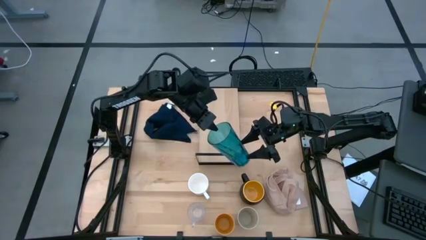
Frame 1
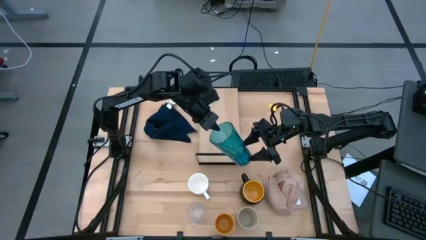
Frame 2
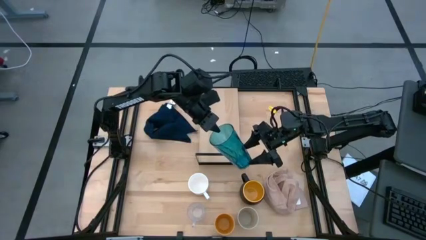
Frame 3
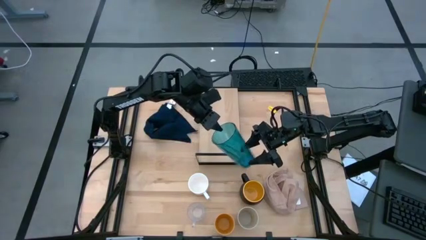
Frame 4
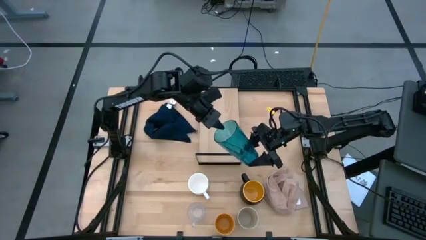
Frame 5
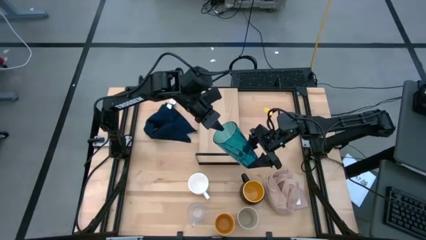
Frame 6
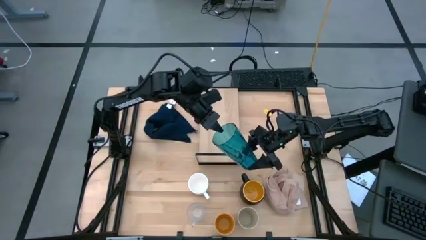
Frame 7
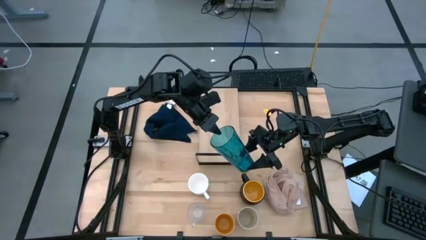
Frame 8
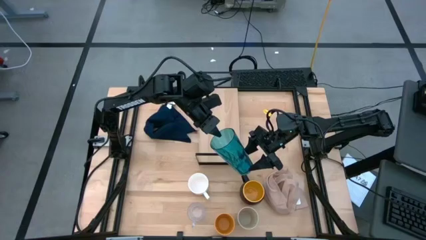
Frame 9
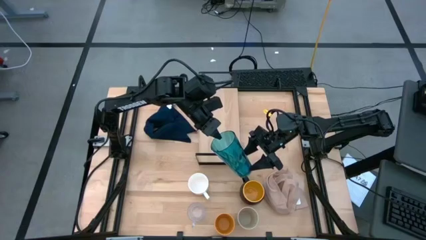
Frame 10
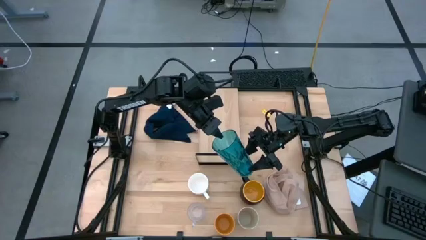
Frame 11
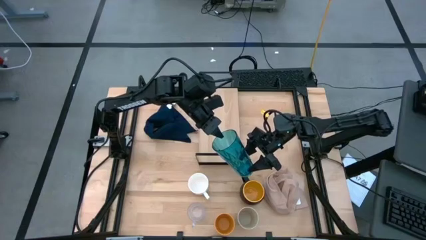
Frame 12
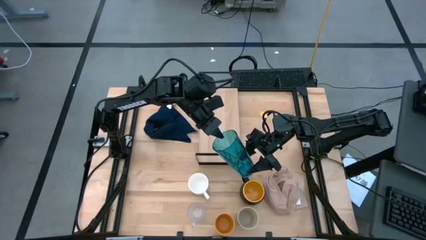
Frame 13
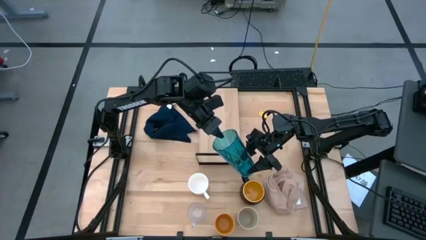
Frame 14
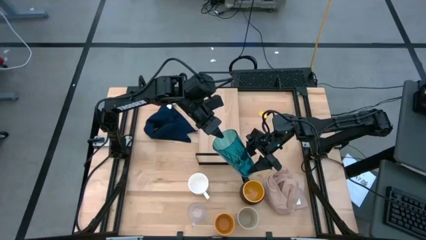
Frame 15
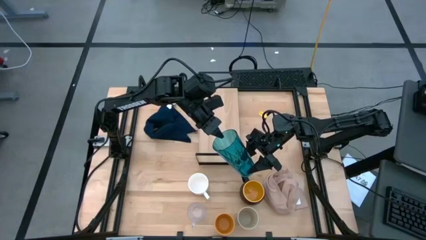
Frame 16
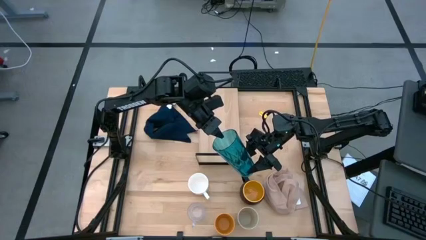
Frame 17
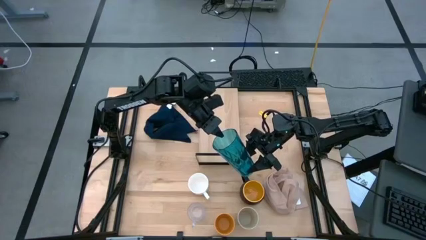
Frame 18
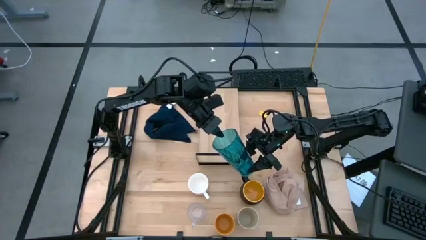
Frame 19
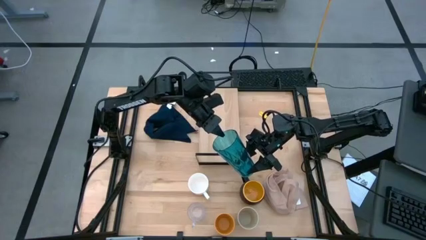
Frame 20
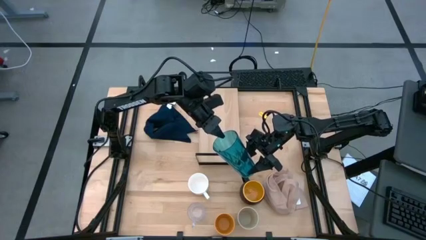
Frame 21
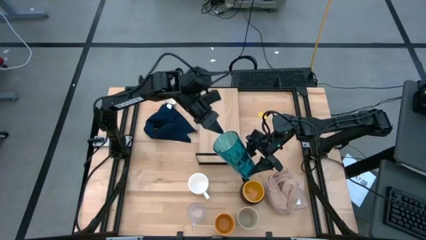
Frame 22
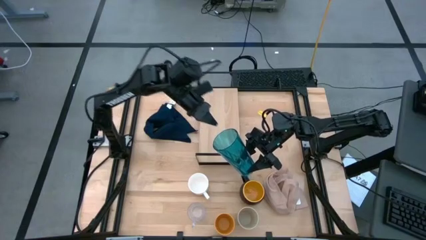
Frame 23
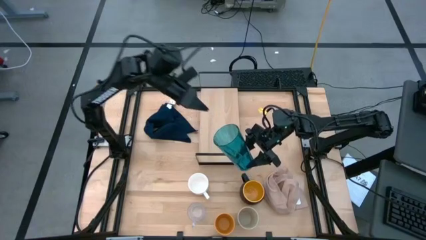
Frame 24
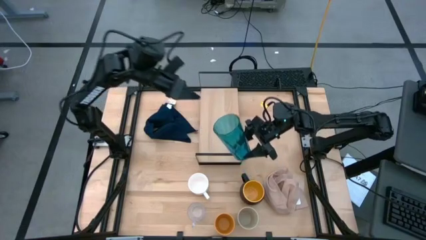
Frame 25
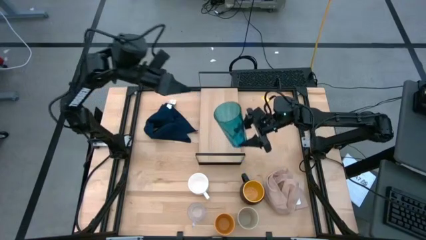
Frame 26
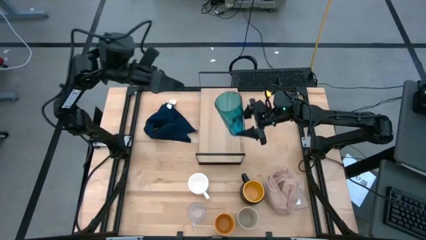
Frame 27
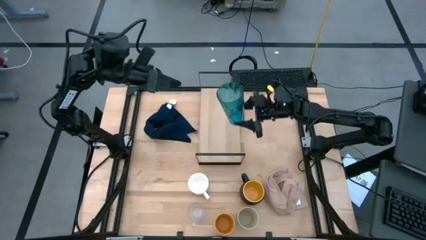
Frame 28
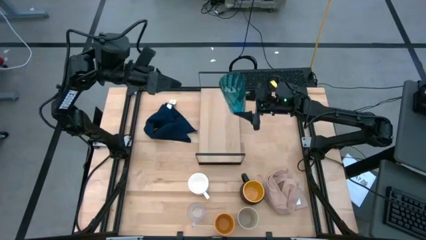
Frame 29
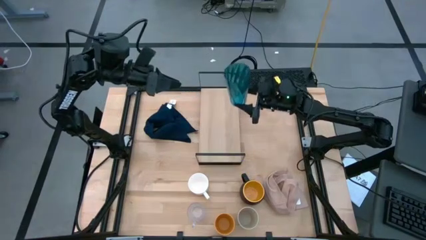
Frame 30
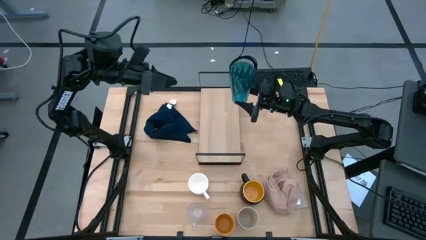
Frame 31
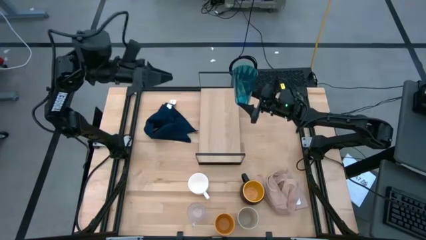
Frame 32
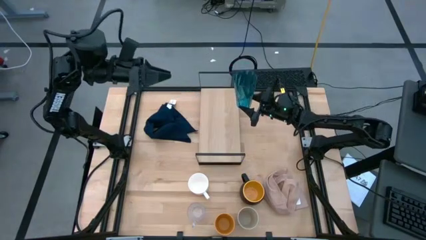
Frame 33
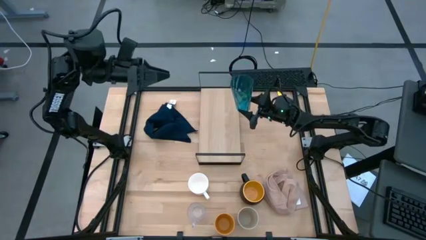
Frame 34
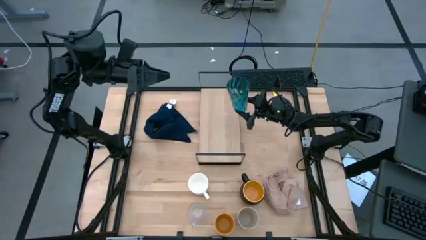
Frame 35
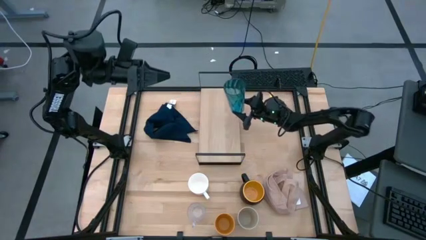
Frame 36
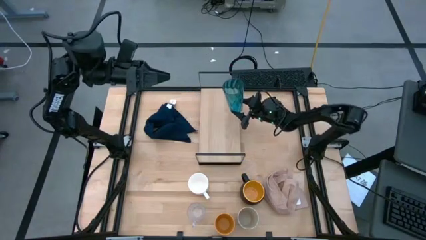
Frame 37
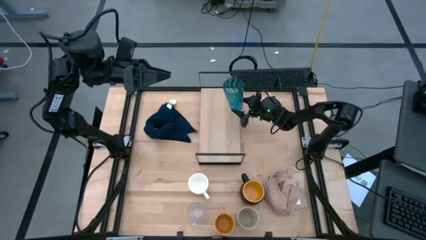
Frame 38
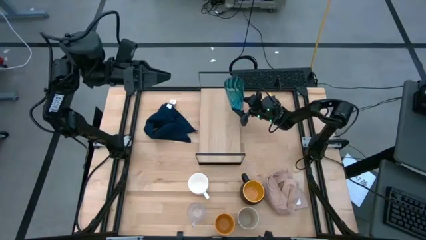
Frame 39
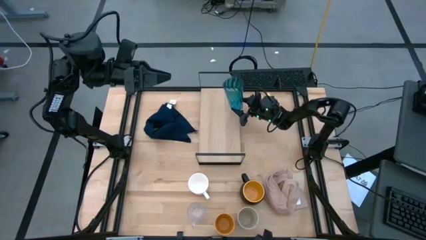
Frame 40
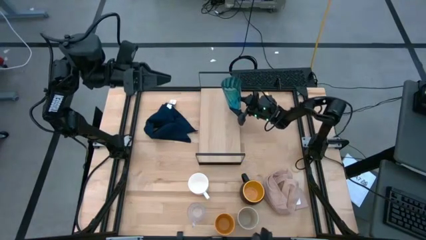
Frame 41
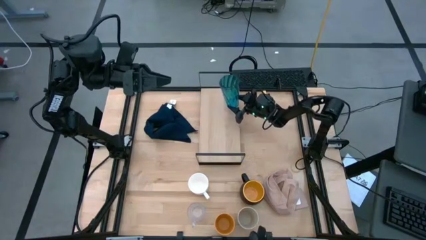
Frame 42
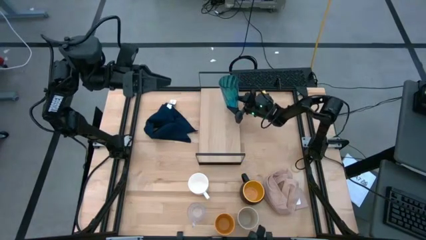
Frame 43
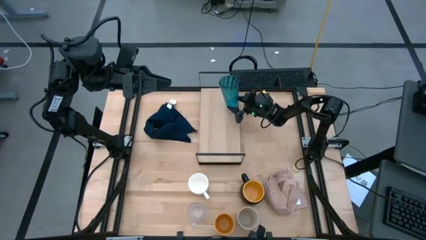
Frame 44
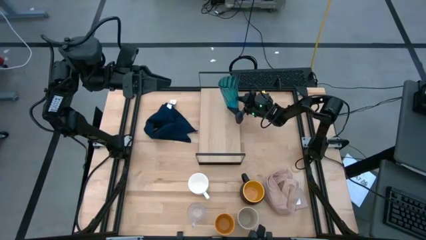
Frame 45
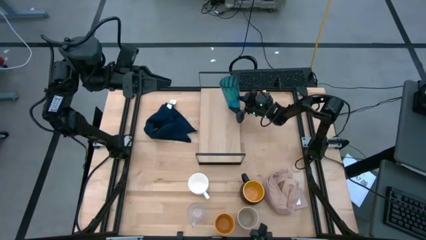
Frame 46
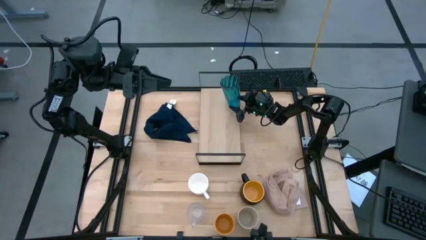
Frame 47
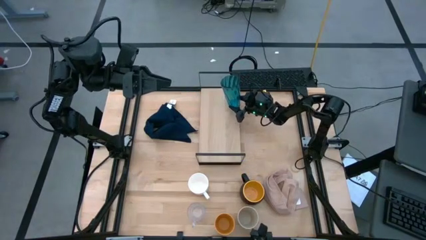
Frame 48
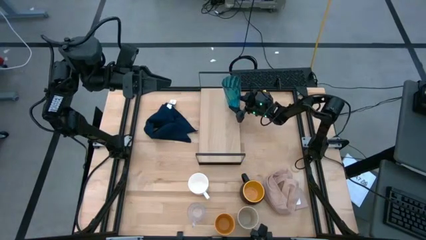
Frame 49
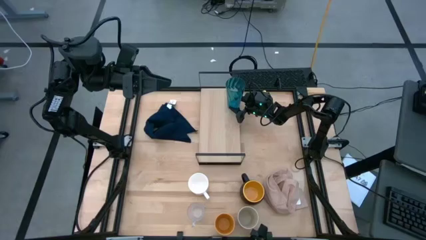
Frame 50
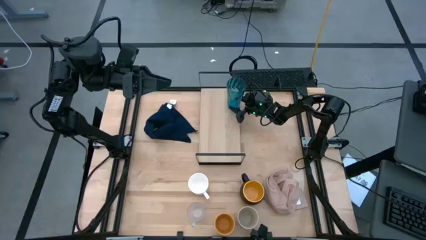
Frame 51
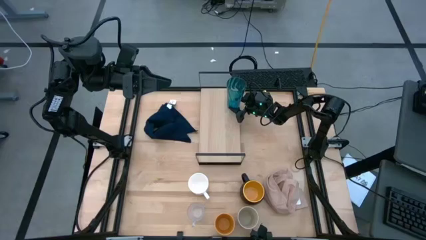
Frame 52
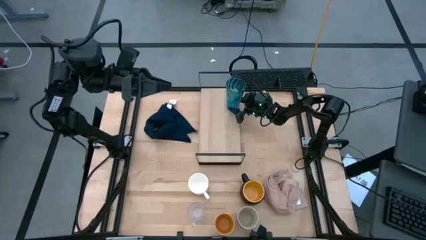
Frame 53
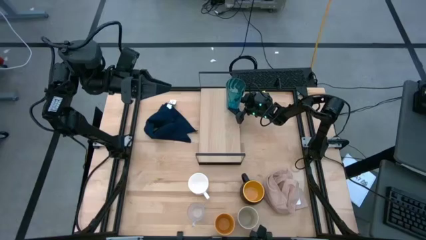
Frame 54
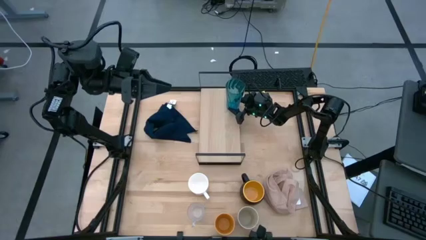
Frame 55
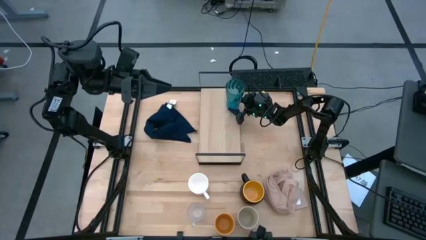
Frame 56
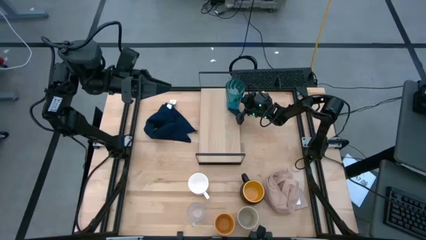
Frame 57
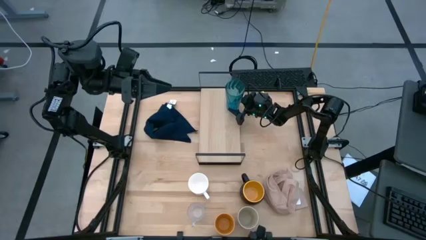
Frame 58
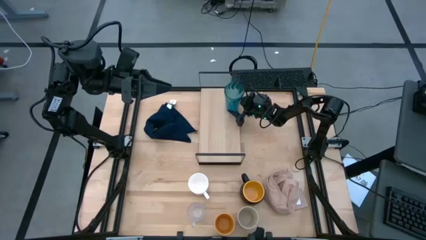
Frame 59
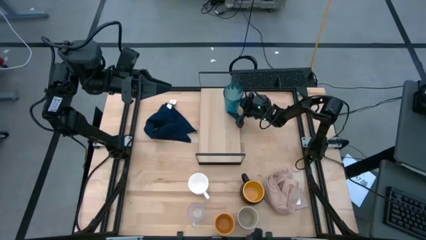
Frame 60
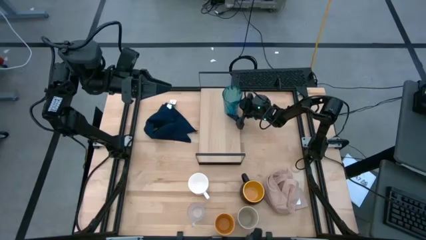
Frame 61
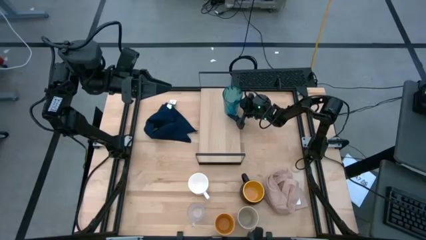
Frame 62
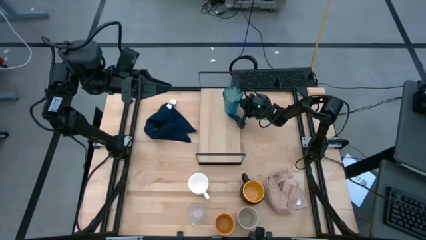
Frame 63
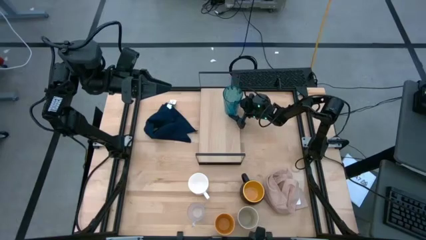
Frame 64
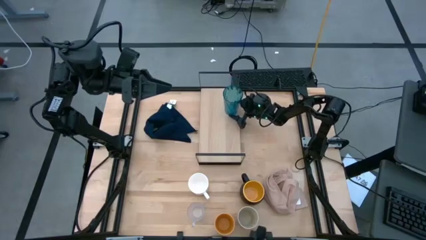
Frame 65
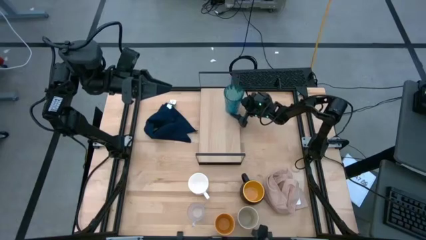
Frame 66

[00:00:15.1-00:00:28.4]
Task: Stack small to large cups/mugs on shelf
Put the blue cup on the shelf

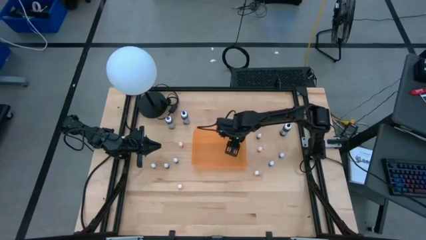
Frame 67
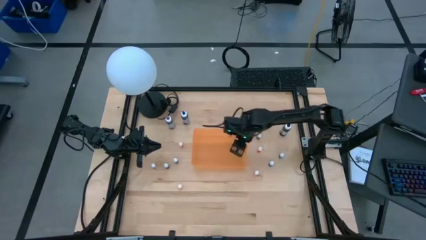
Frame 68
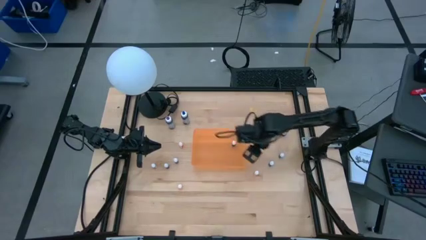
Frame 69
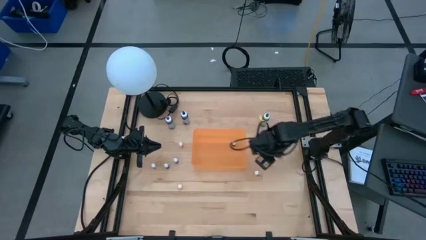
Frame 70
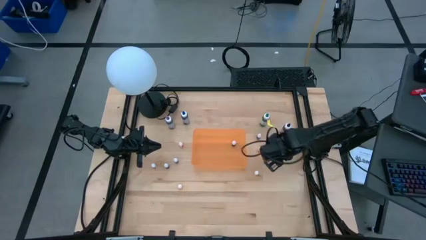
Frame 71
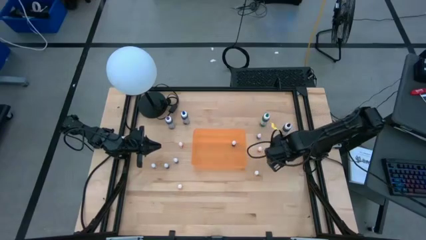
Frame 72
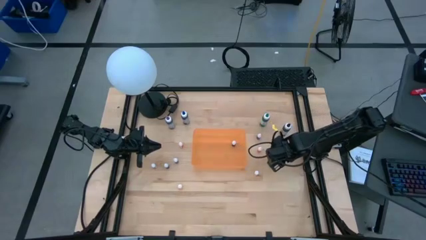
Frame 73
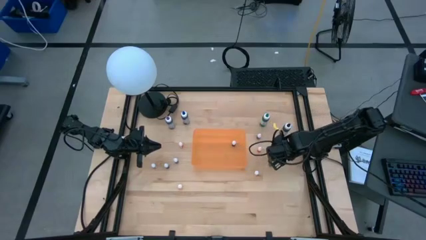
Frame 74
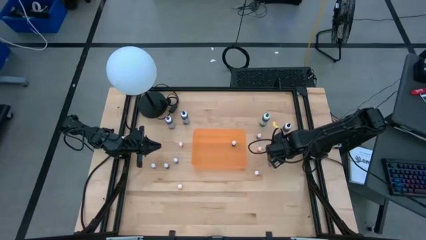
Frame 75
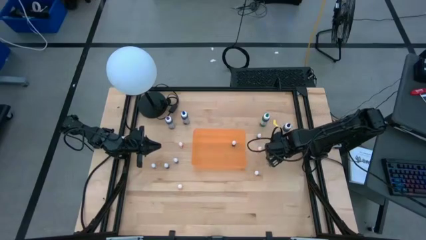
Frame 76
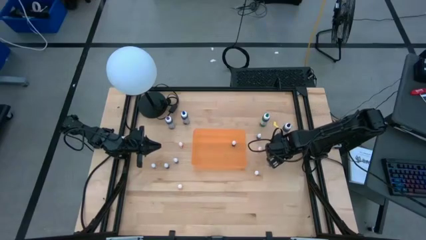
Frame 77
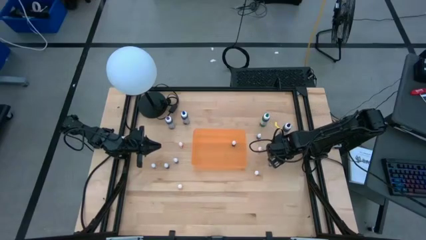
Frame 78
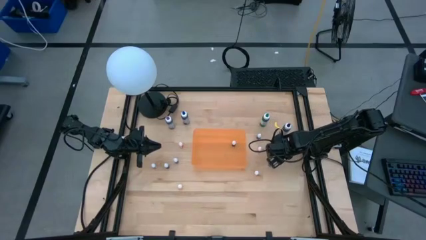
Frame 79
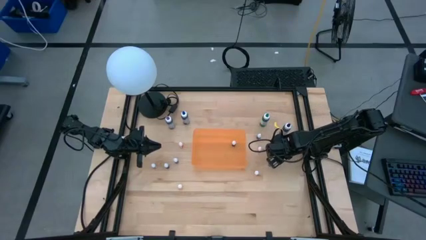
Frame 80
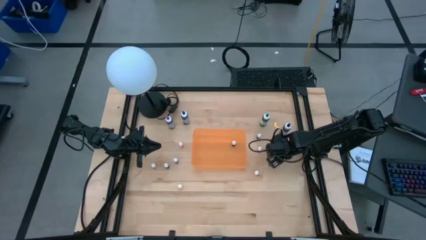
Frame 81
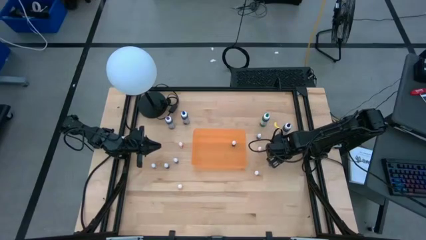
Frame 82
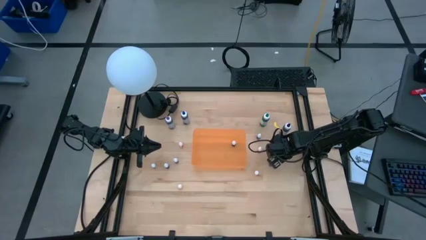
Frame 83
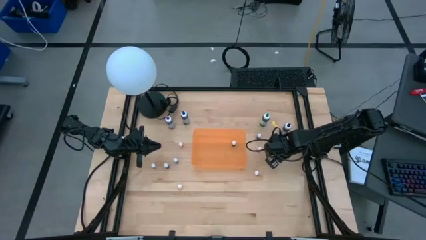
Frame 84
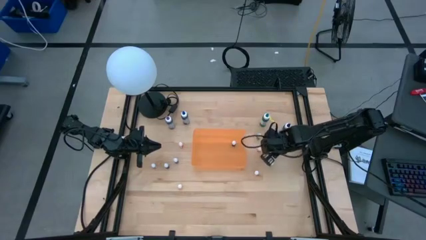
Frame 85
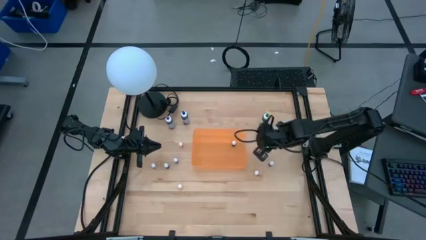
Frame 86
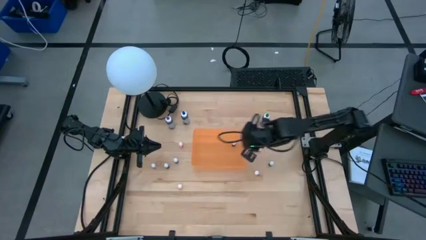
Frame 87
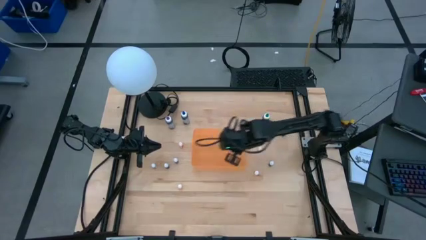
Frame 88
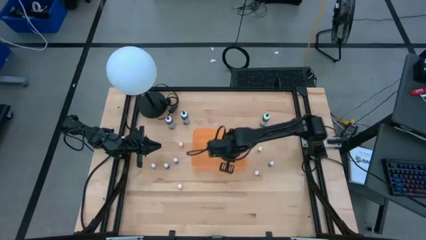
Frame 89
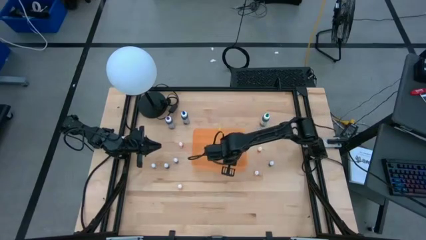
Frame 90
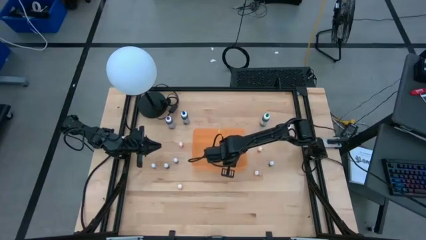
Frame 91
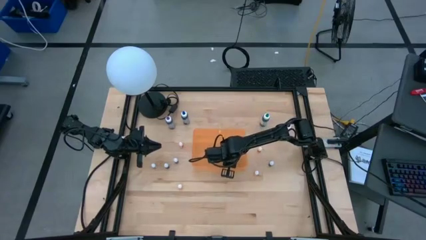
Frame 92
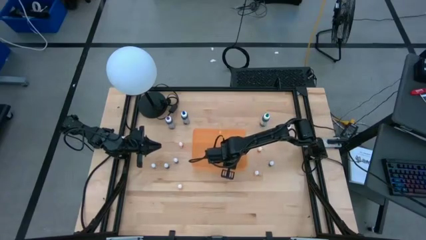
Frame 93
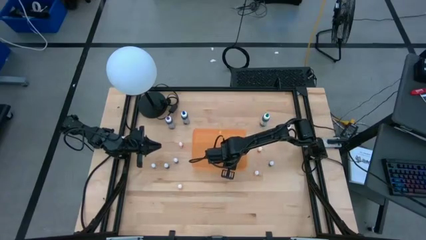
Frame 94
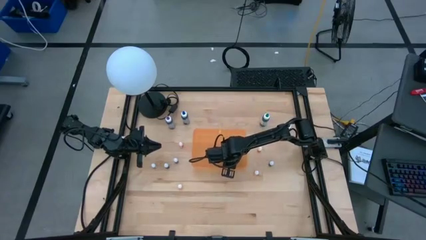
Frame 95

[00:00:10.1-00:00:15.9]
Task: Pick & Place food coloring
Put the small green food coloring bottle into the orange bin
